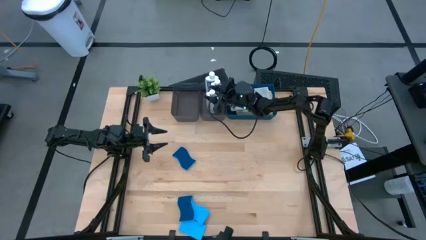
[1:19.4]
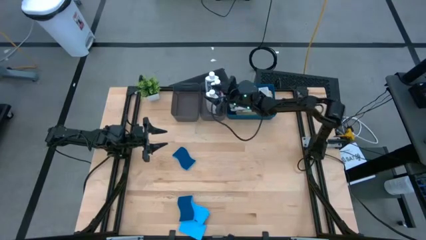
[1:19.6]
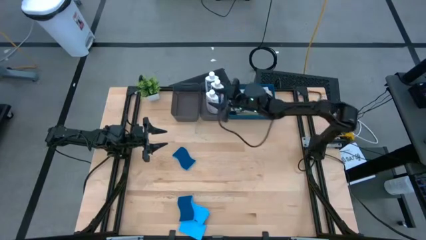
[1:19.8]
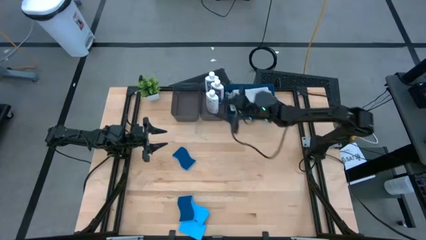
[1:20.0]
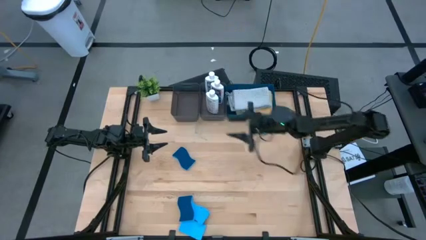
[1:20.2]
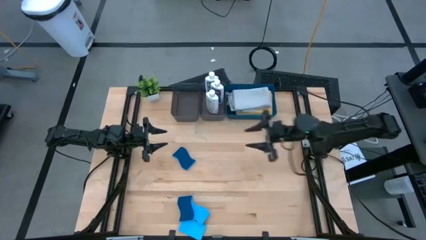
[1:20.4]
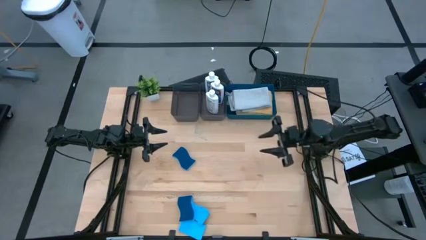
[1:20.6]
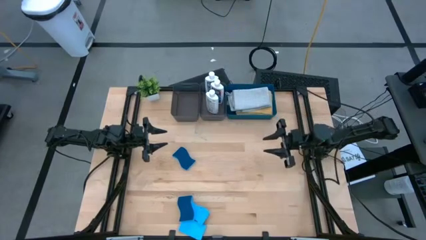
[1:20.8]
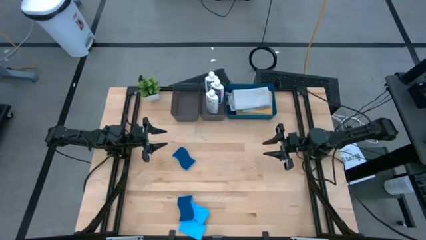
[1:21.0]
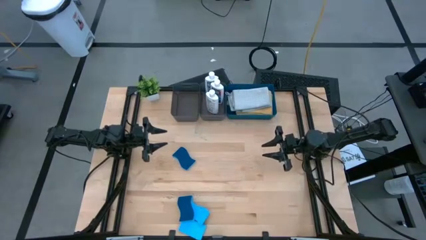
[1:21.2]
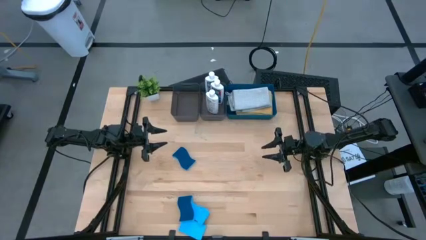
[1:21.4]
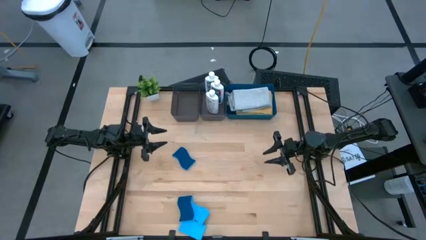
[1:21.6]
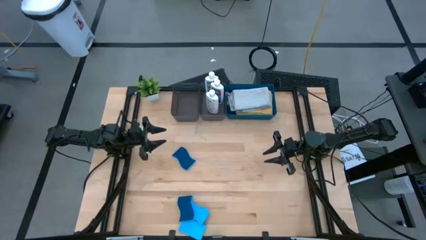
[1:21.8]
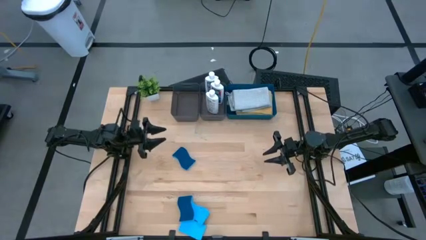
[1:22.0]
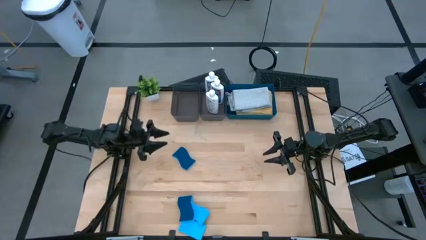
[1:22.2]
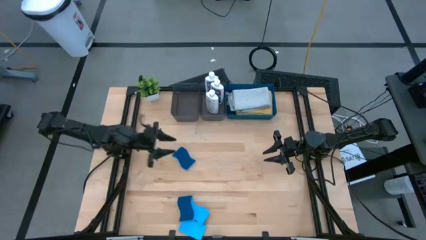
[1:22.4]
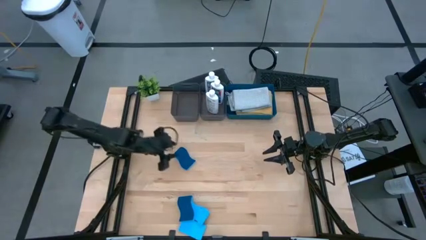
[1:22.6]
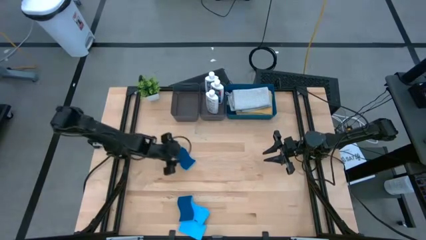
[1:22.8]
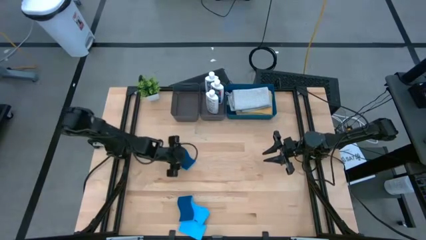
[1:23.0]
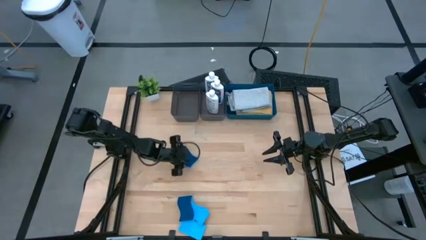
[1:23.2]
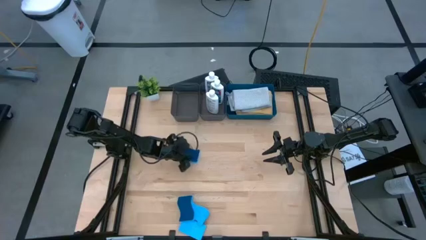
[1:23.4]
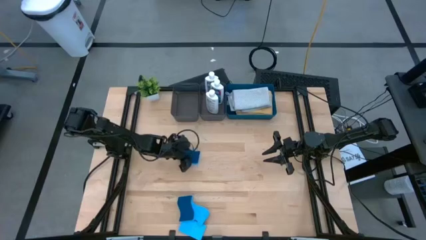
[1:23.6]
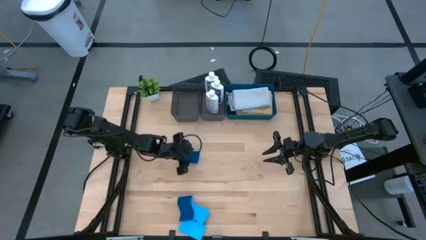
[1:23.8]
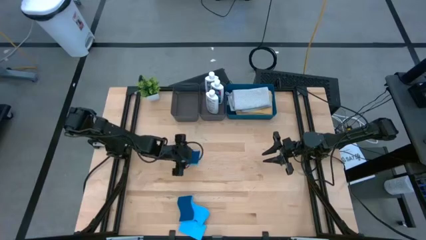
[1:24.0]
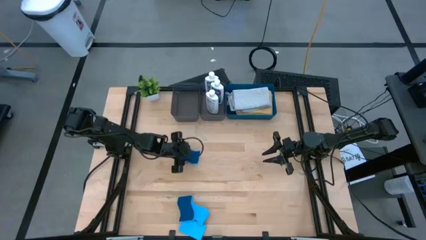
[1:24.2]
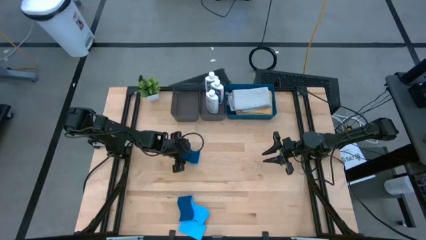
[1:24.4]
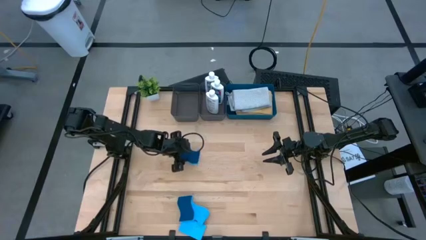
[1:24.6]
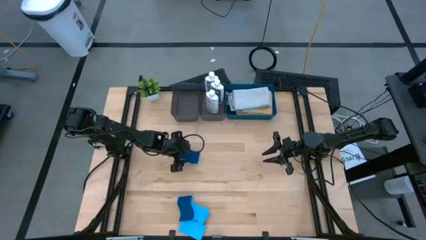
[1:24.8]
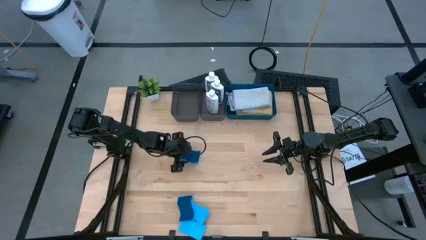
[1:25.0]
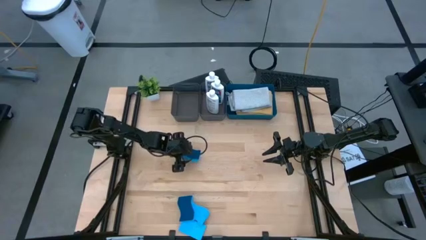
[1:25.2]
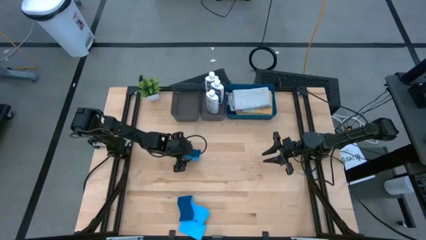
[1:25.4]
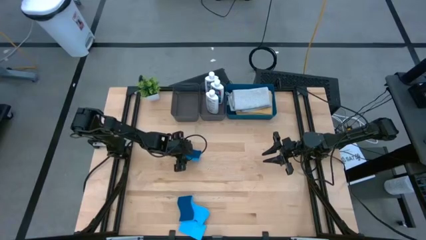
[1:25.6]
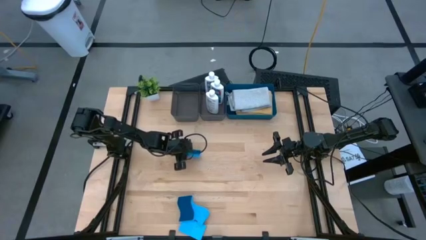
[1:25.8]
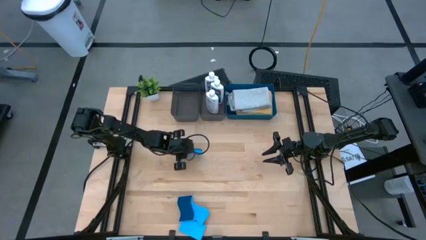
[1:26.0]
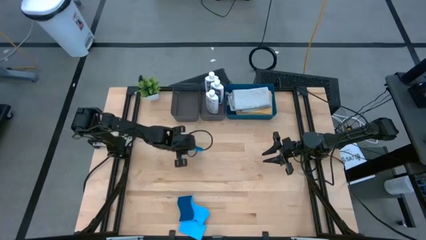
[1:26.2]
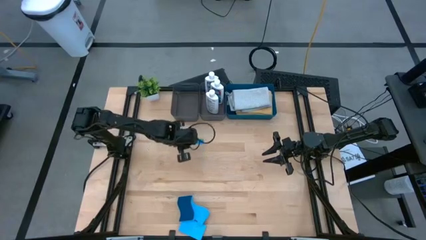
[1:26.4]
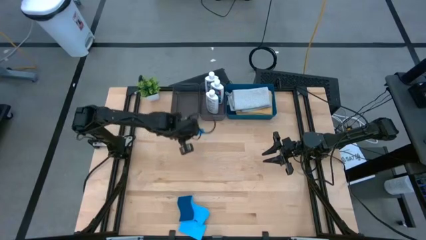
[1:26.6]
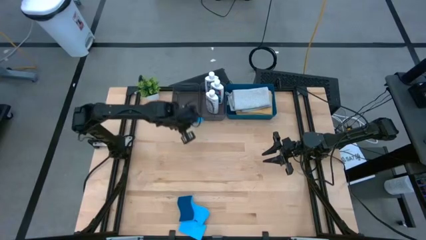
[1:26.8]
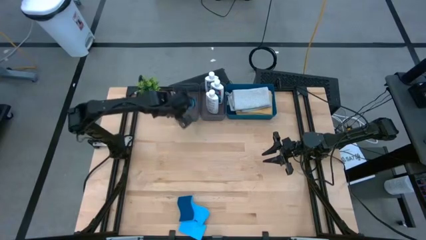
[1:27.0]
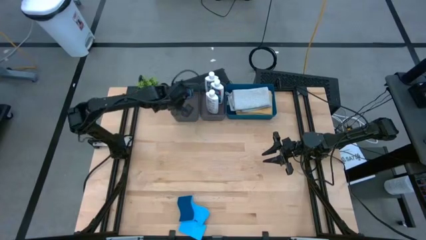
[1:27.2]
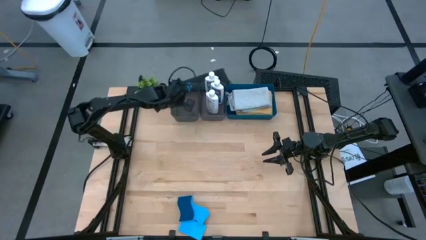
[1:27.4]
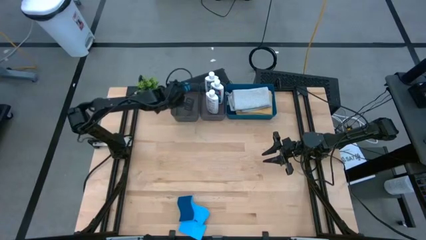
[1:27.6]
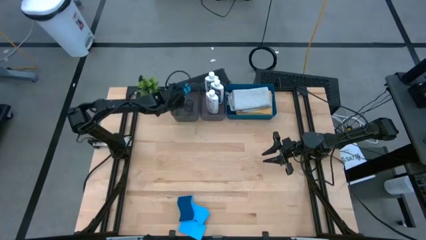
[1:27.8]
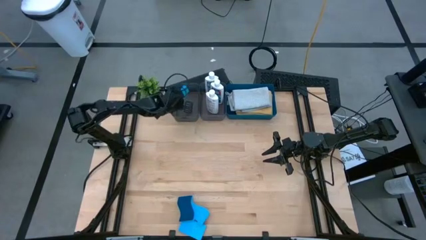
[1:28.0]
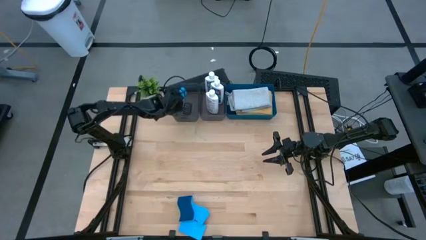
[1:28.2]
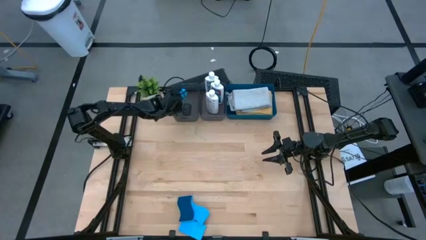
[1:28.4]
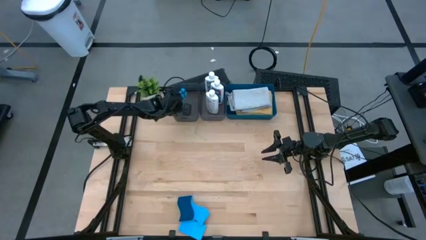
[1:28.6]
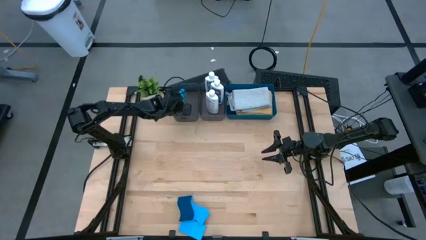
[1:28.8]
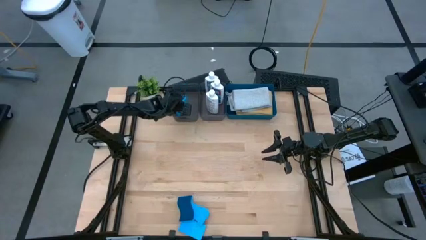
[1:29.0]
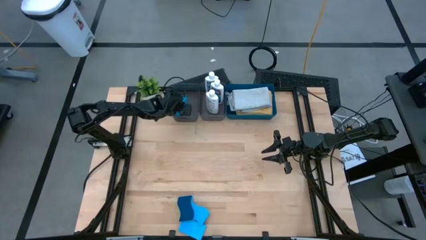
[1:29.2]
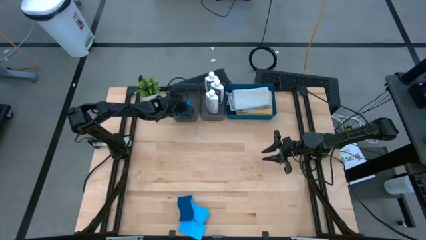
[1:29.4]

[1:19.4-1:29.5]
Task: Pick & Place Kitchen Items
Put the top blue sponge into the left black bin

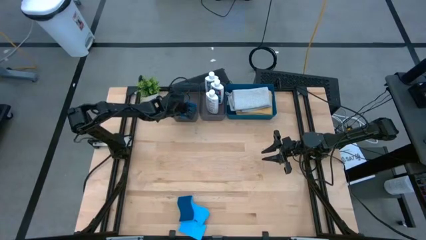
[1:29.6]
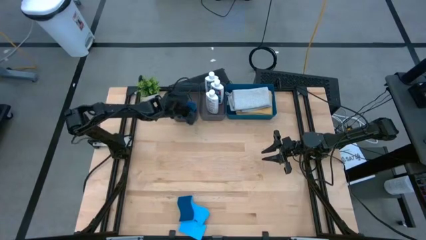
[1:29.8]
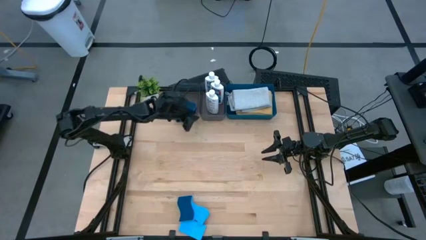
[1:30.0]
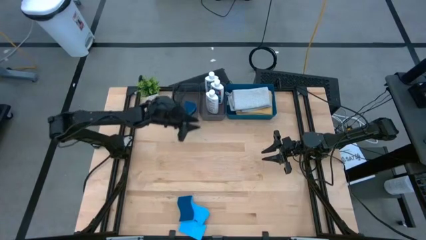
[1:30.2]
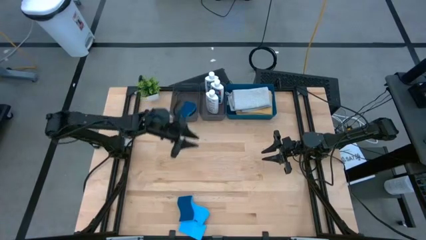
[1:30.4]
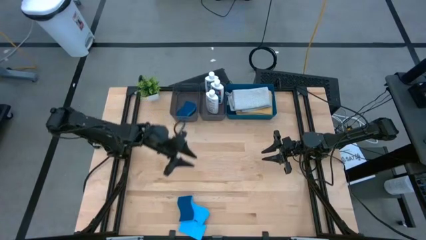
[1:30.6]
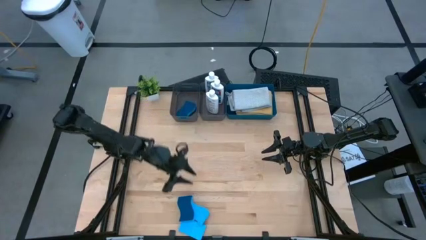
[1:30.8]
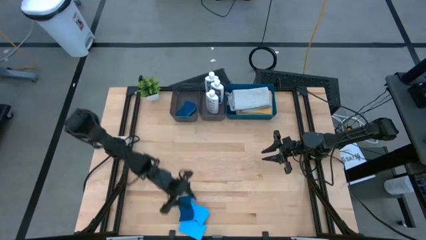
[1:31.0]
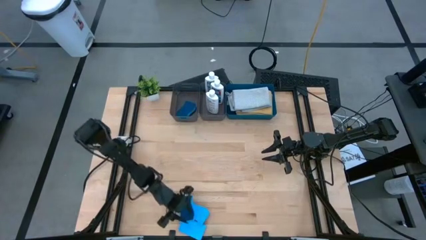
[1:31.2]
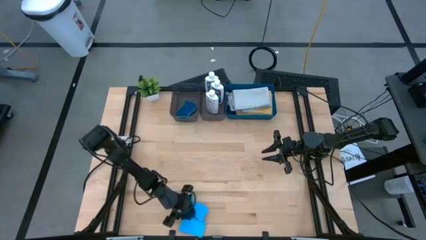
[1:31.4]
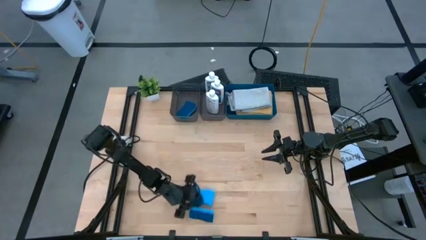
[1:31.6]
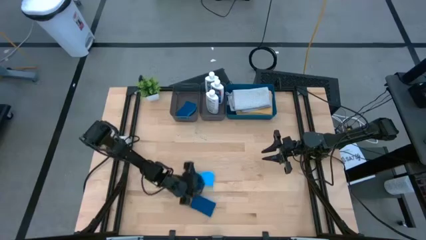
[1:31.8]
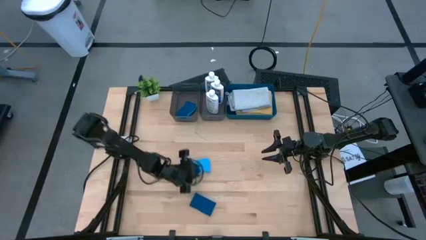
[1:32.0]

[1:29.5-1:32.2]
Move the sponges to the middle of the table

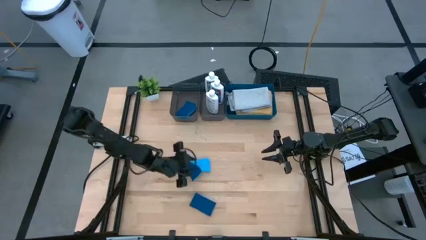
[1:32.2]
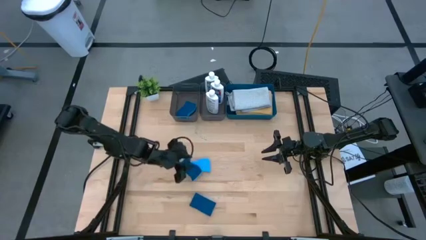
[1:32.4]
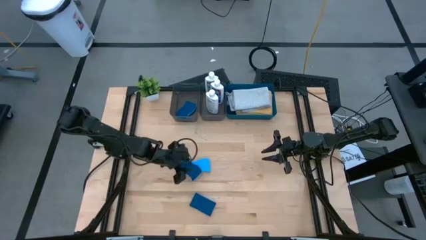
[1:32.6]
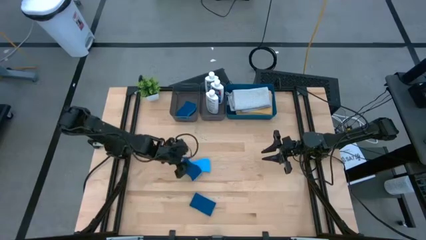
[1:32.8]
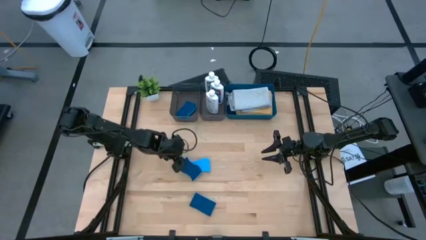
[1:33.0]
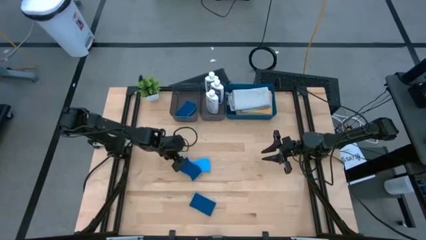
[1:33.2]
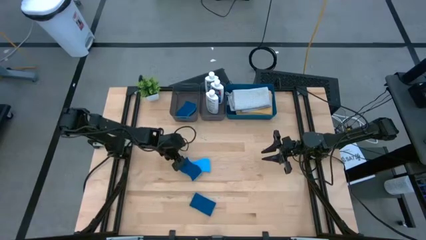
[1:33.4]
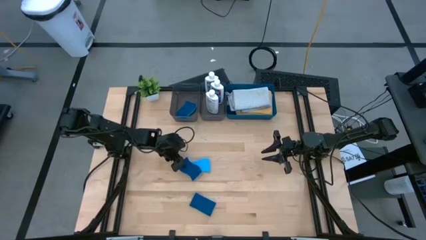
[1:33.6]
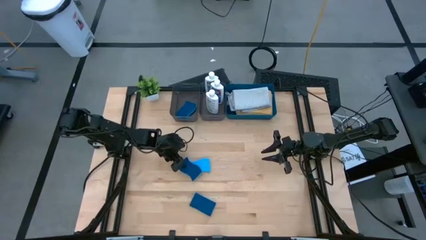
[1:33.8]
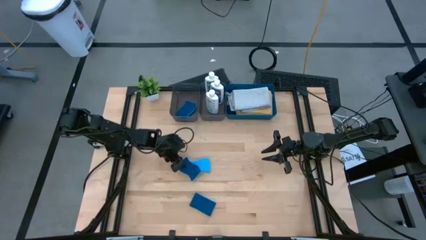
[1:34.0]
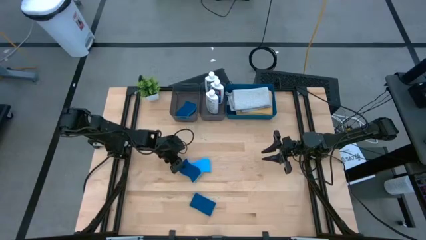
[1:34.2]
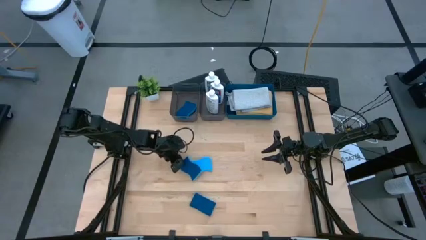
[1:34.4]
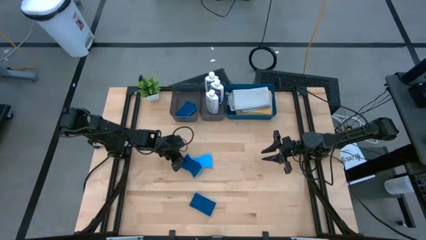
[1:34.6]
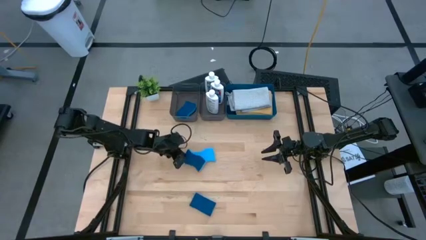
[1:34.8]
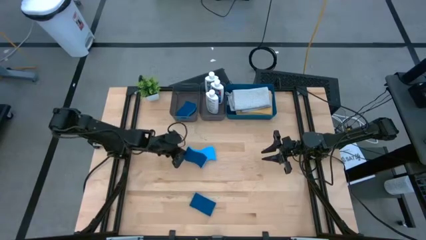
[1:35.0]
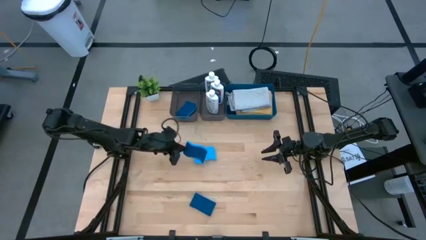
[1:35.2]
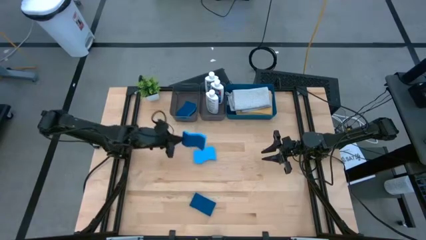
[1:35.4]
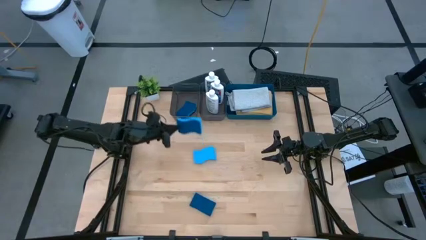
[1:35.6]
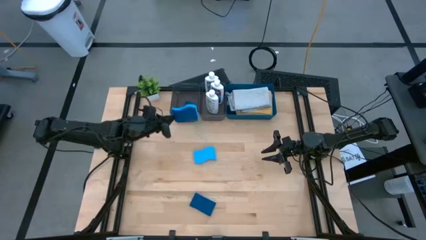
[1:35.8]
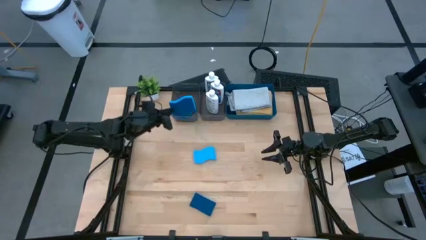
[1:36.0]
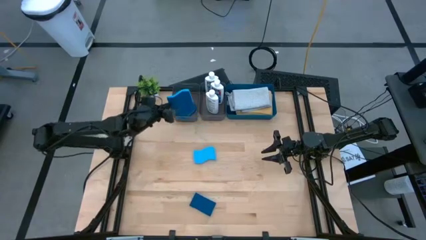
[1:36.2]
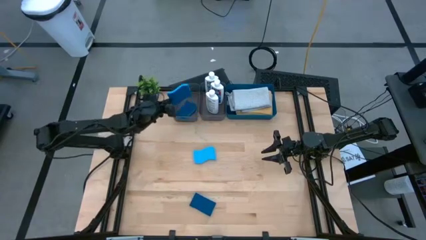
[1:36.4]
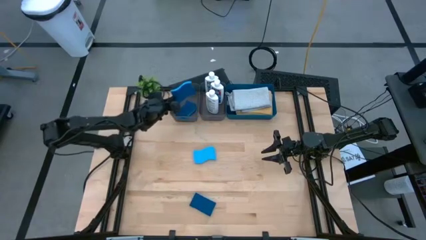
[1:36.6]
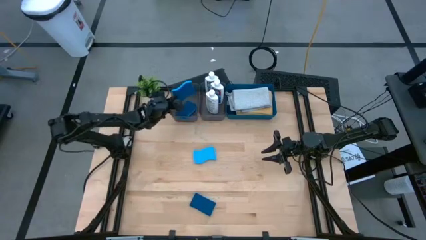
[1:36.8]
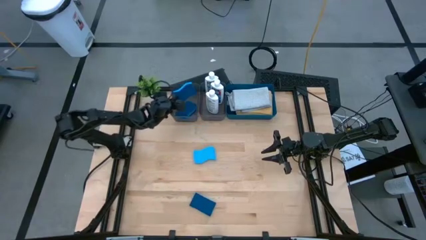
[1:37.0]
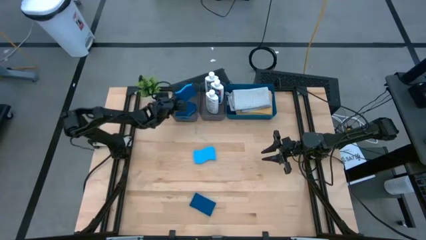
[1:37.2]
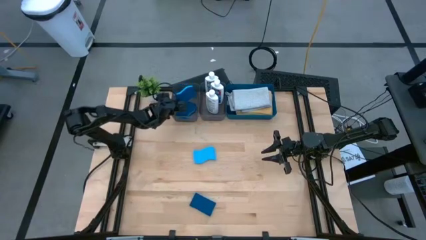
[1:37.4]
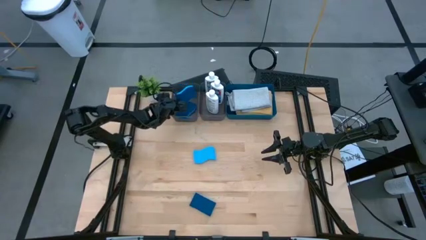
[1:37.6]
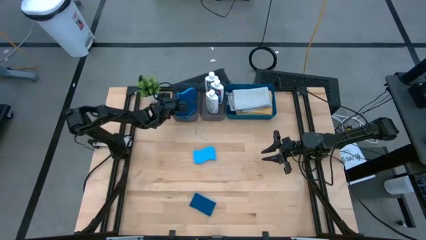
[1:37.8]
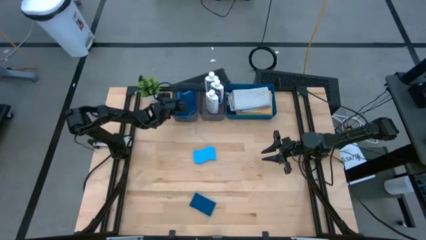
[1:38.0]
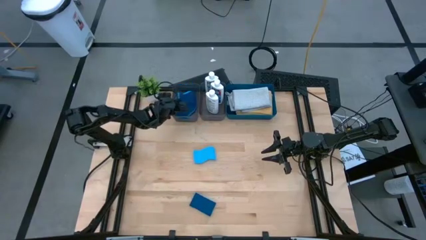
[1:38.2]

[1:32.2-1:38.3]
Put the top blue sponge into the left black bin
